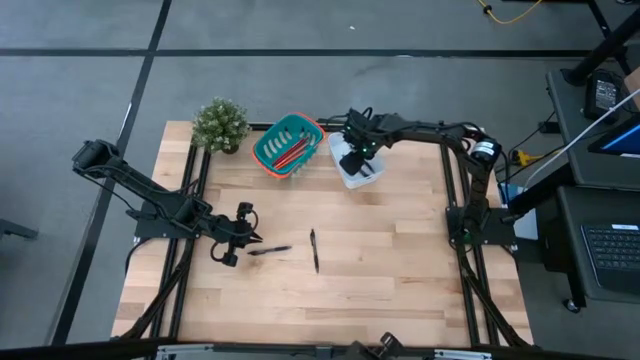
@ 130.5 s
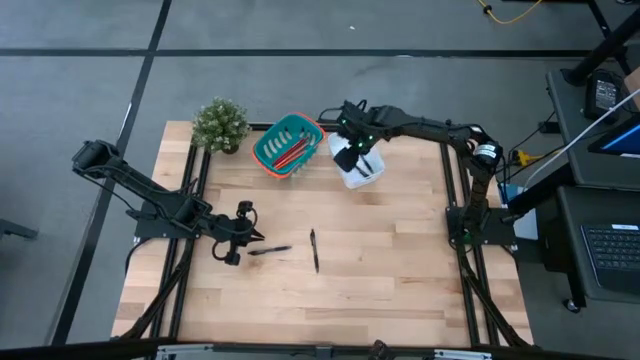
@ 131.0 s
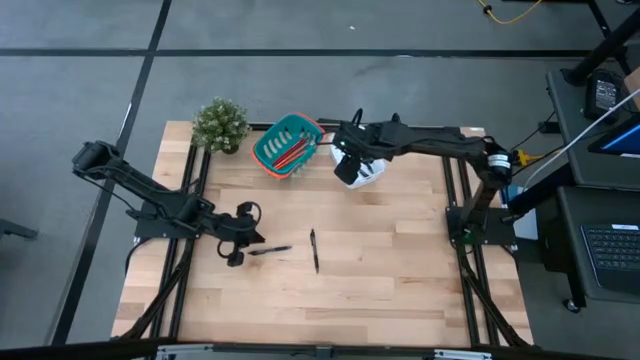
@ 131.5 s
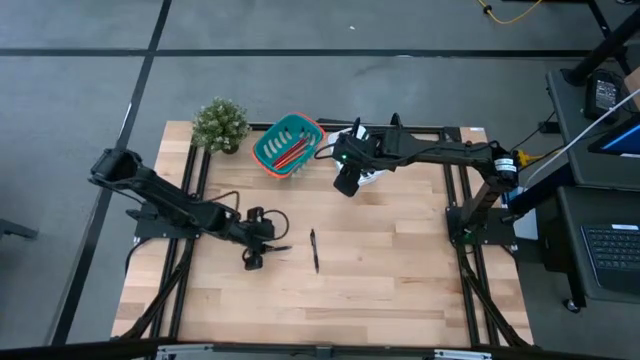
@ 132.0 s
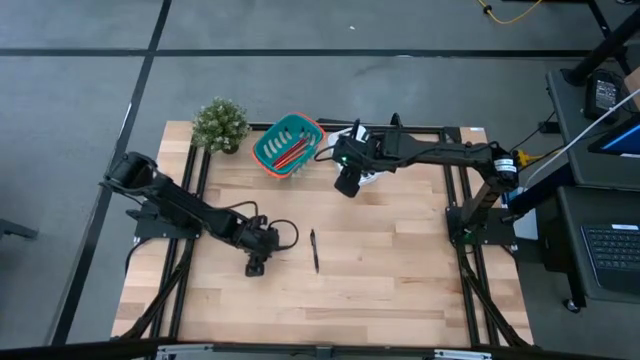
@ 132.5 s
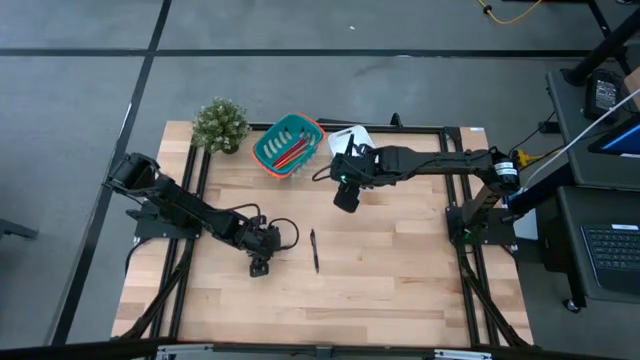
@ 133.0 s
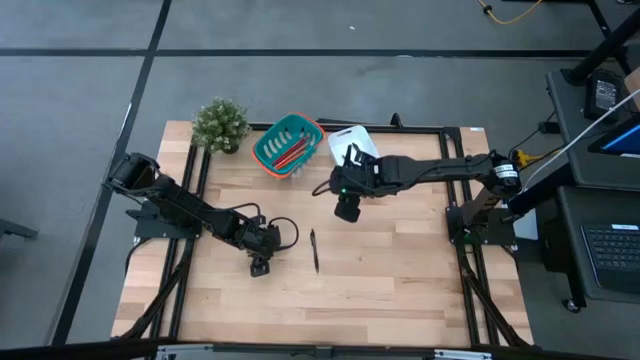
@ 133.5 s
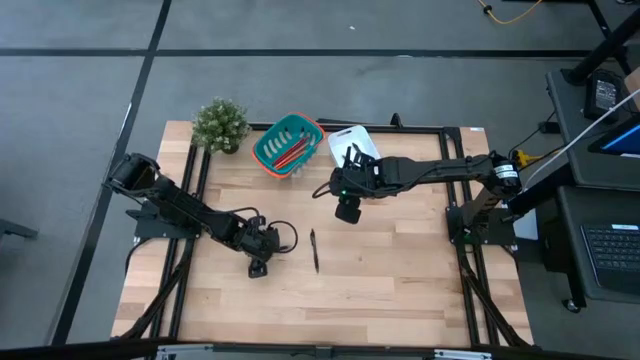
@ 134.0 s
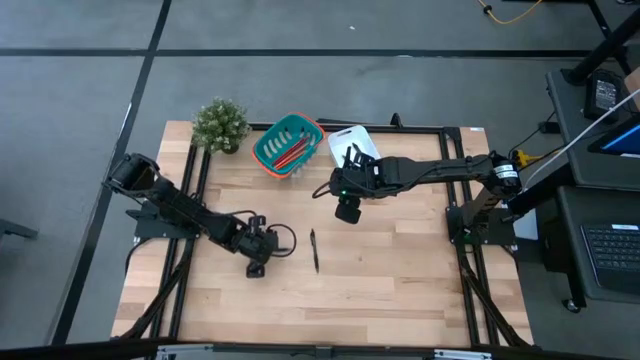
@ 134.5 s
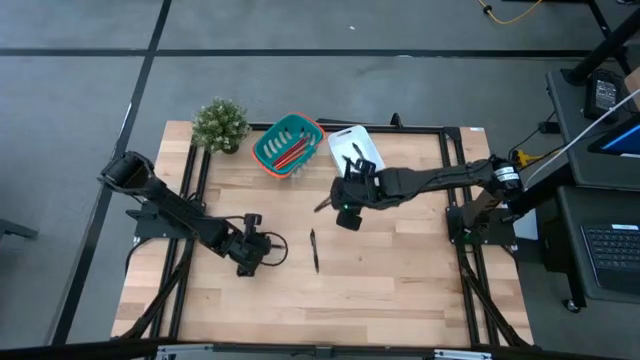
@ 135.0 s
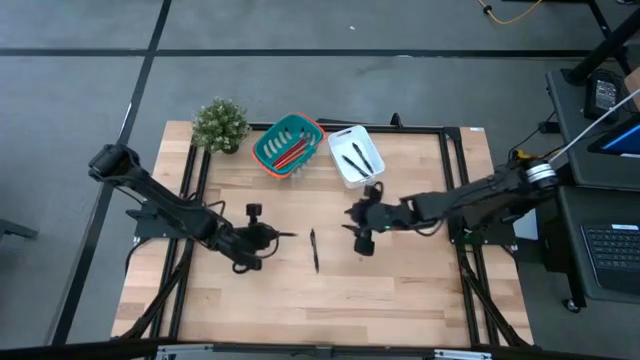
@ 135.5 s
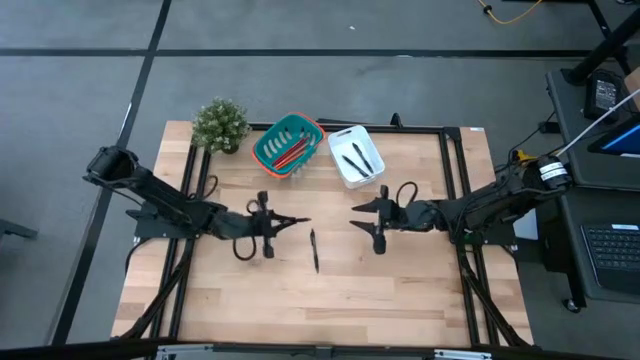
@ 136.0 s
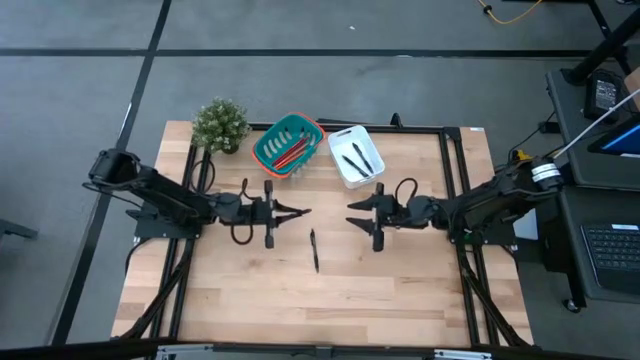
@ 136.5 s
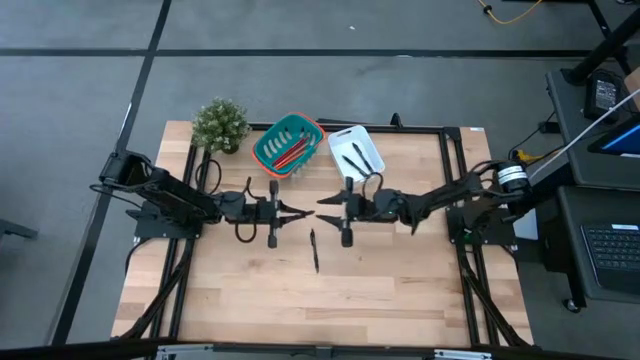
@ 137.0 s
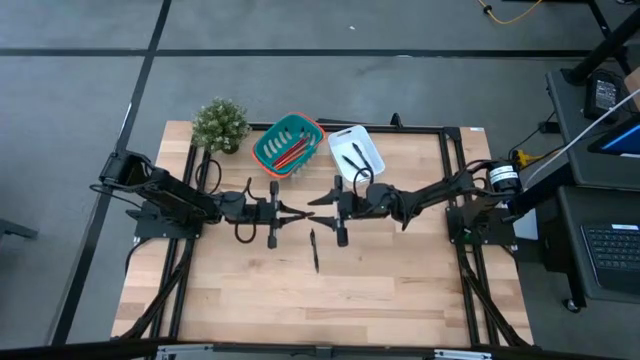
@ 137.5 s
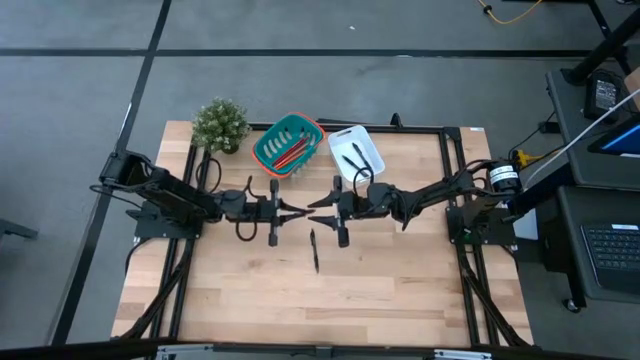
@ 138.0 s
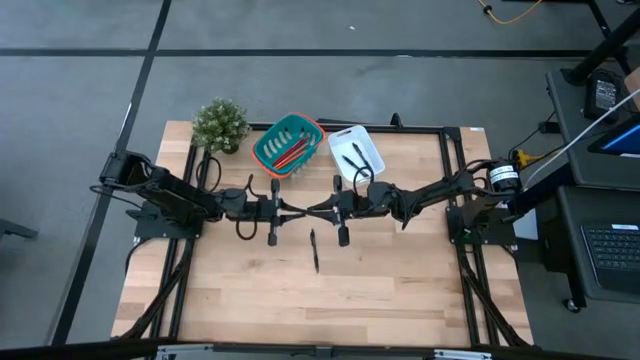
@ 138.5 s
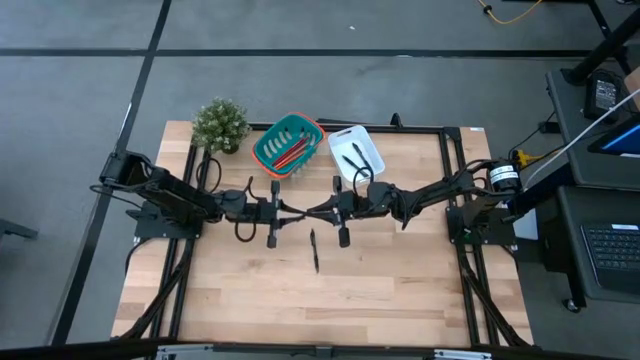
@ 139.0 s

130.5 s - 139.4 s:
Task: Sort pens & pencils
Put the black pen into the white bin

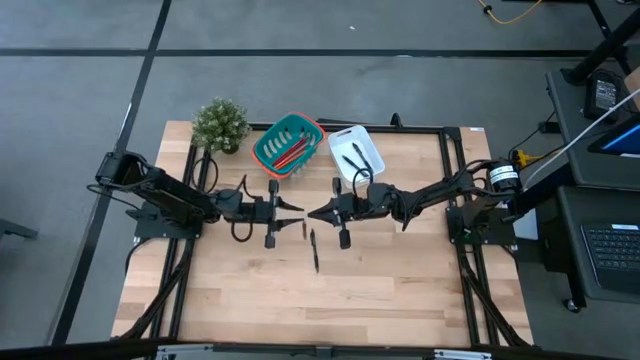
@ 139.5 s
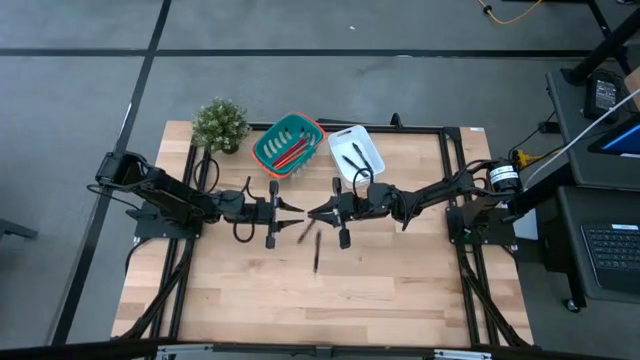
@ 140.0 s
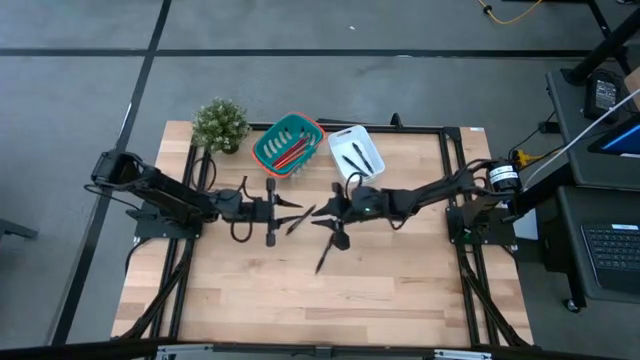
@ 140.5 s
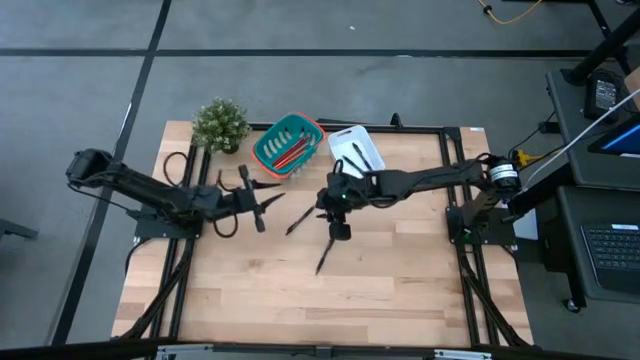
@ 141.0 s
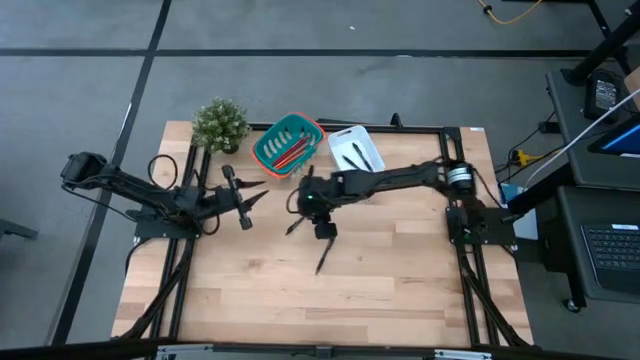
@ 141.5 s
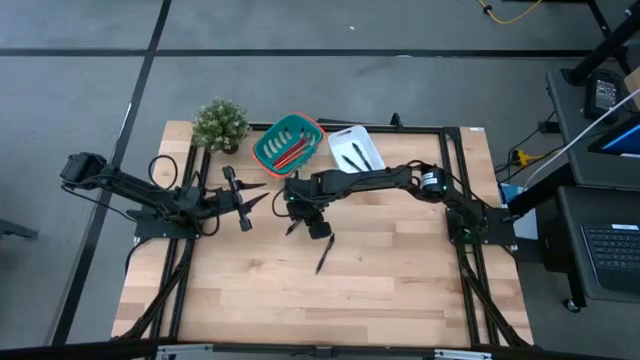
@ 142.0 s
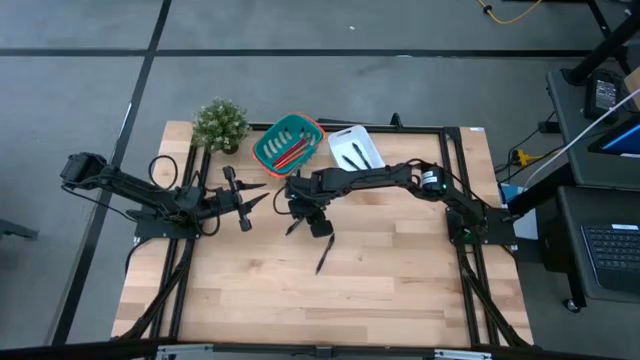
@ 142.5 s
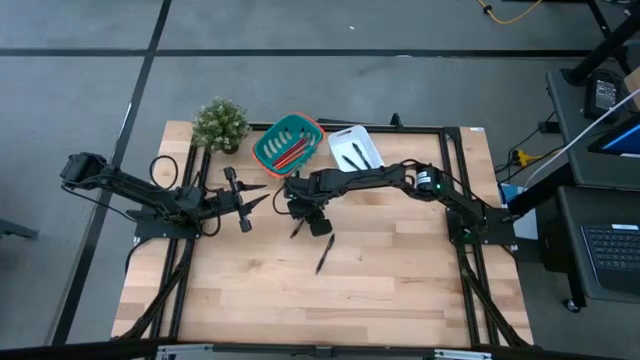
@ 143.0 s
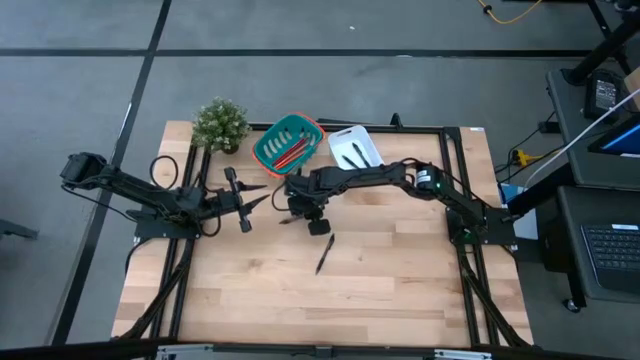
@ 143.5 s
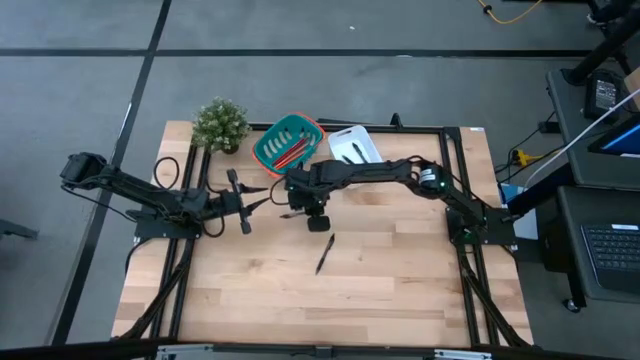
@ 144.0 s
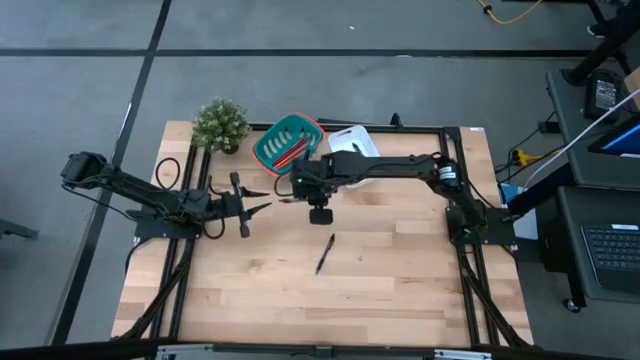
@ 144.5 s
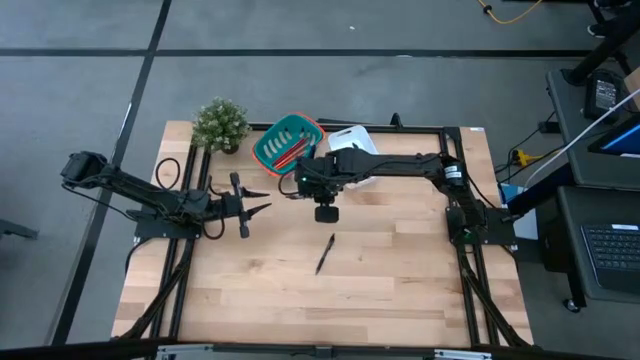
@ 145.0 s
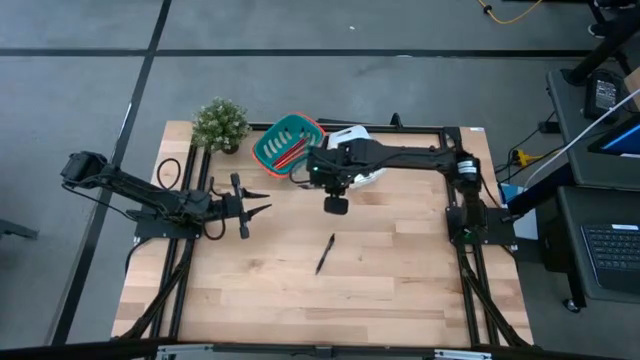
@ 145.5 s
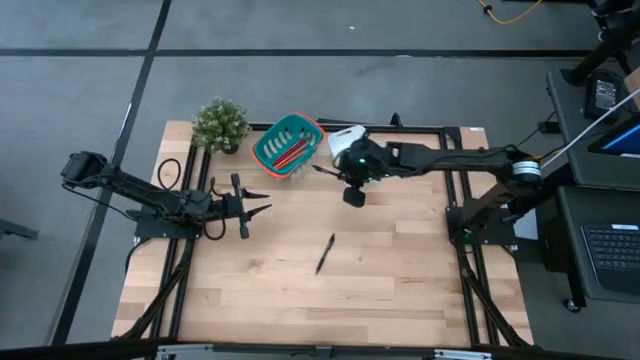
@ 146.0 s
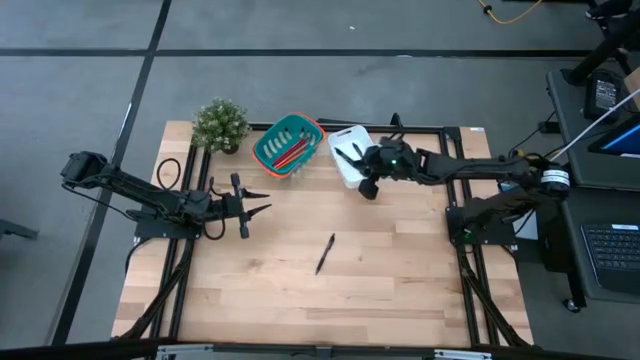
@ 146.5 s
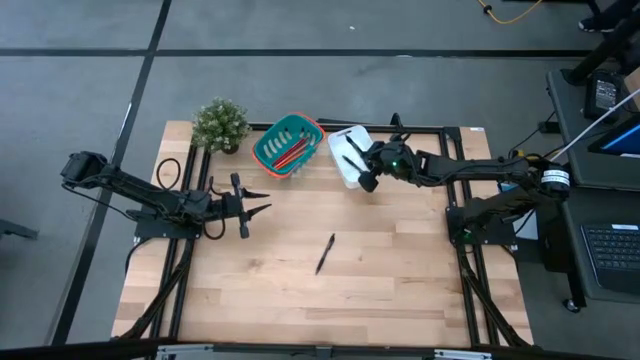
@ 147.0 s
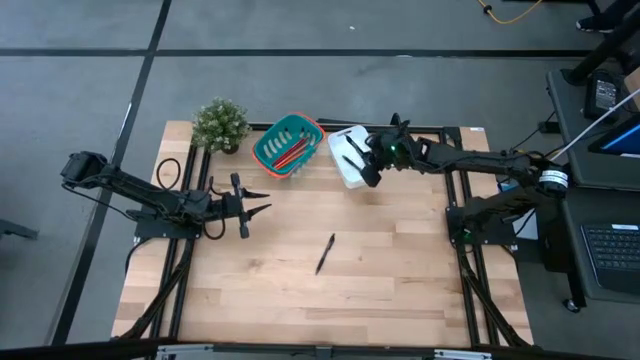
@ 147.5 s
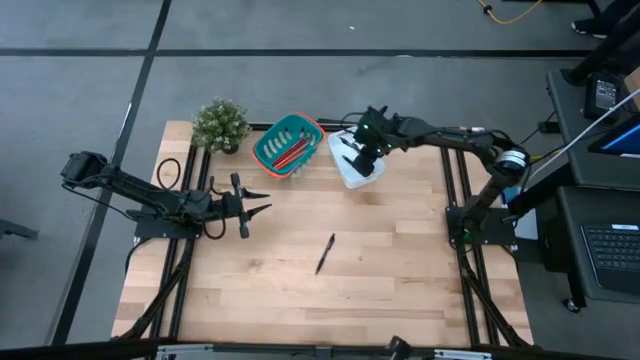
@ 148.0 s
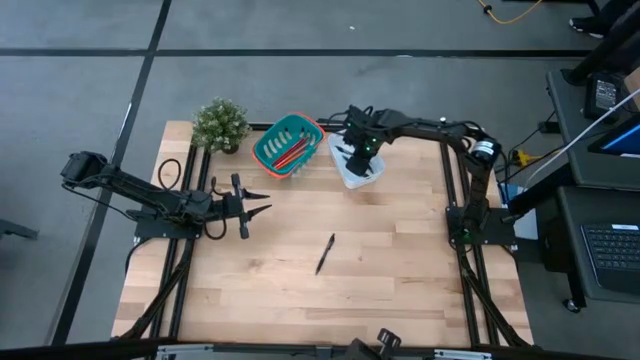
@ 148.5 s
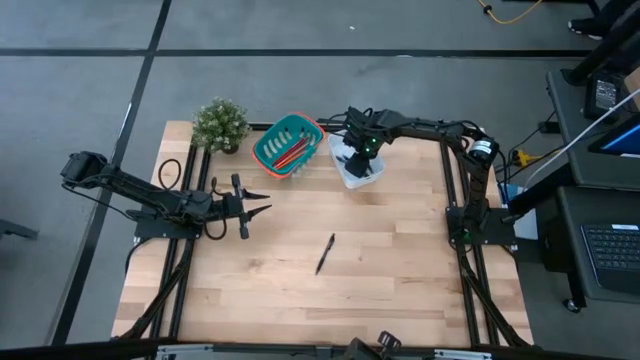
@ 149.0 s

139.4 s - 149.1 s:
Put the black pen into the white bin

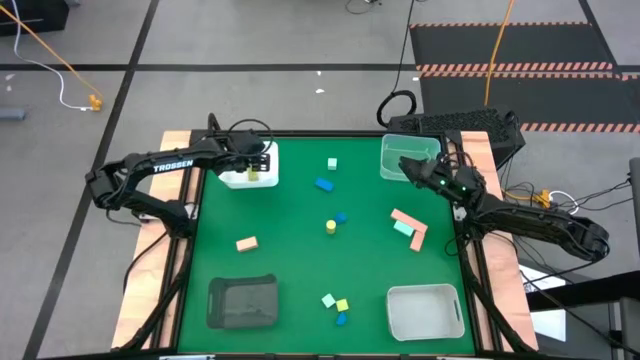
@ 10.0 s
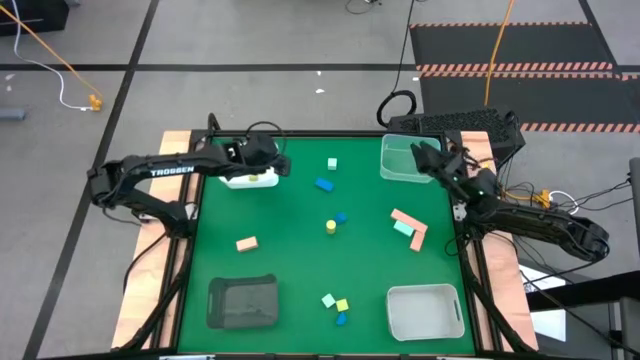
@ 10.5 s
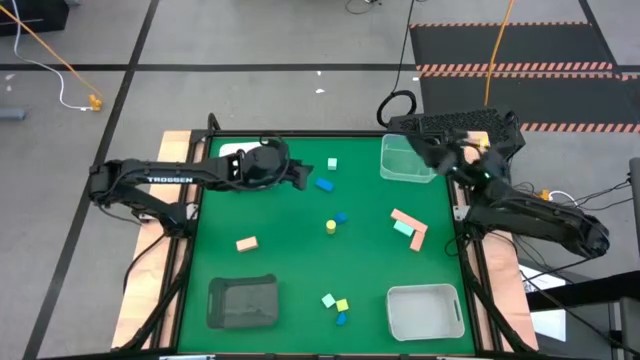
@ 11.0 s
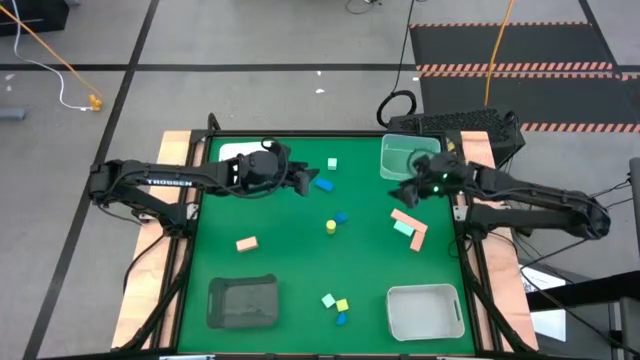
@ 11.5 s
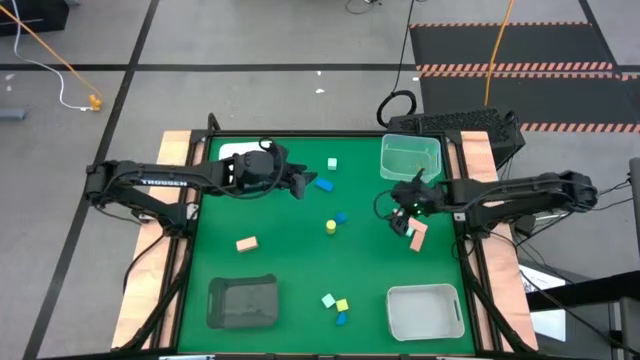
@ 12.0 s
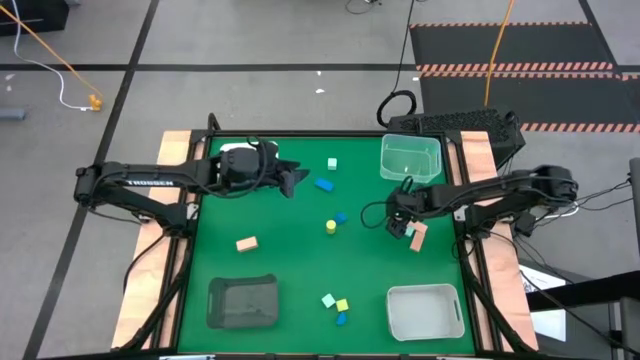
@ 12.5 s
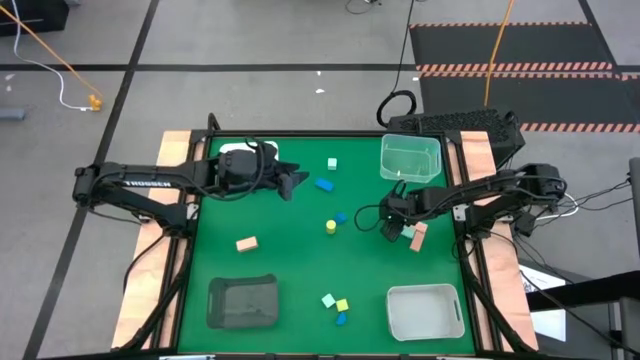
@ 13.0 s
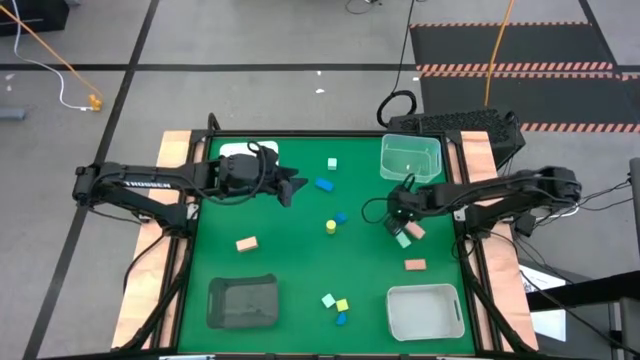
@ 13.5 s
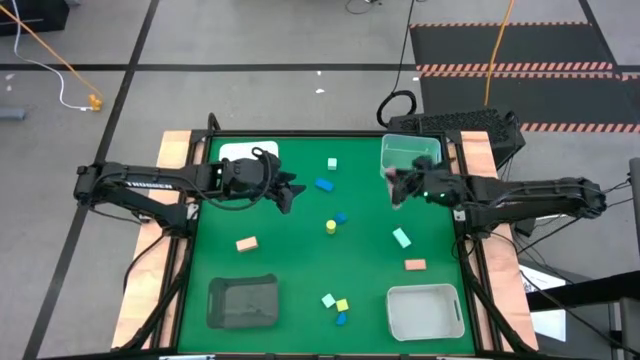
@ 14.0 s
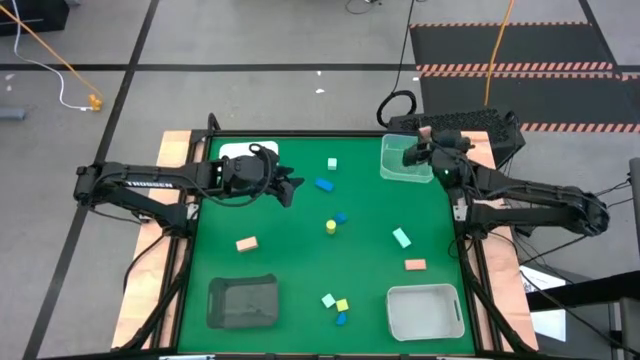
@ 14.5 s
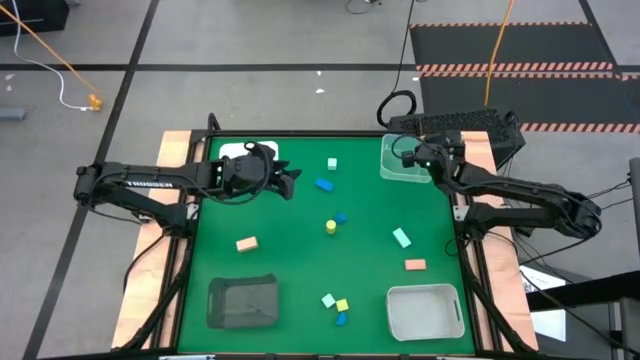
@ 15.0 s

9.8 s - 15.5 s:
Task: Sort & place blocks by color
Put the top light brown block into the transparent bin
